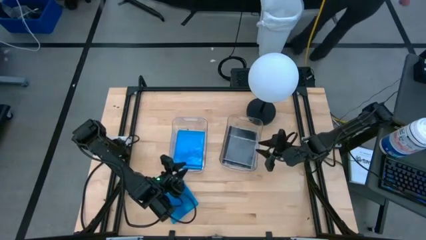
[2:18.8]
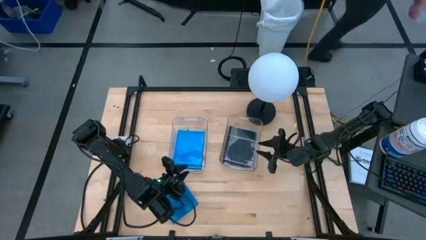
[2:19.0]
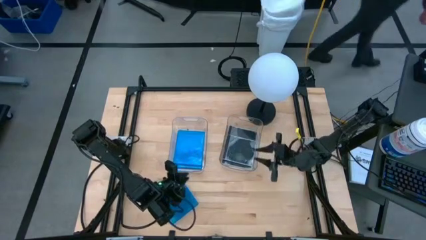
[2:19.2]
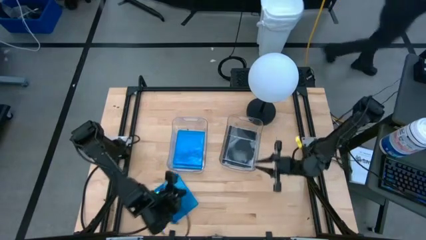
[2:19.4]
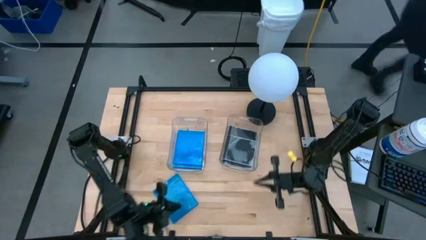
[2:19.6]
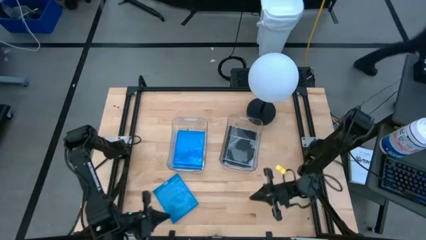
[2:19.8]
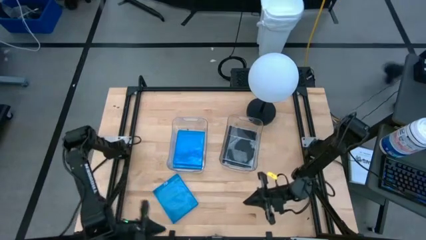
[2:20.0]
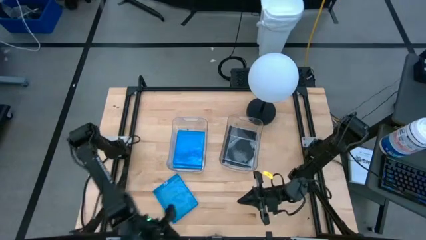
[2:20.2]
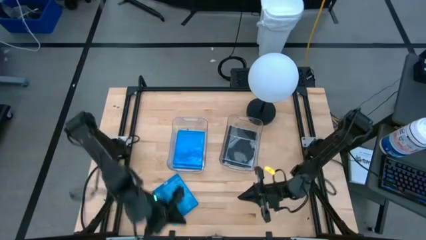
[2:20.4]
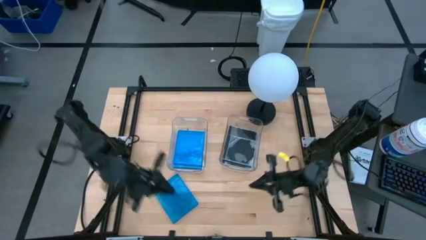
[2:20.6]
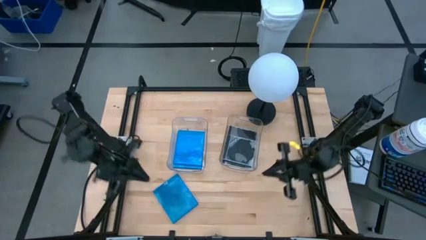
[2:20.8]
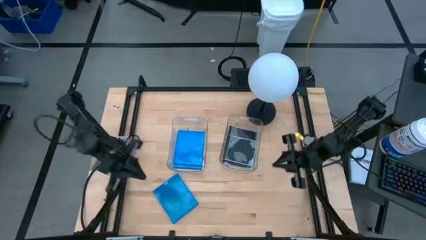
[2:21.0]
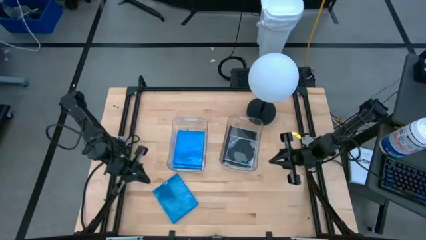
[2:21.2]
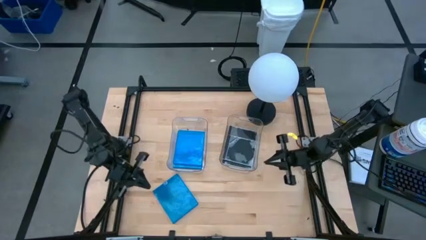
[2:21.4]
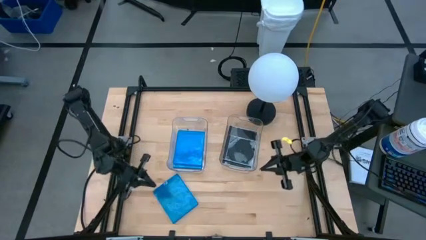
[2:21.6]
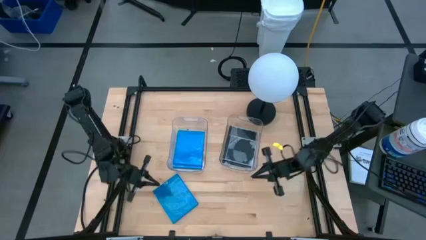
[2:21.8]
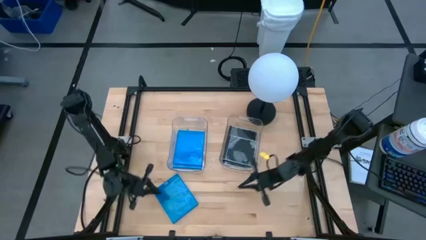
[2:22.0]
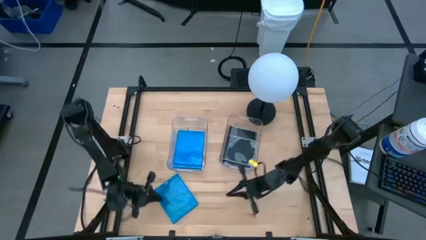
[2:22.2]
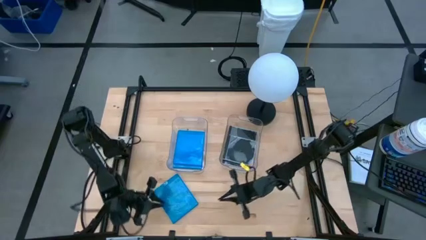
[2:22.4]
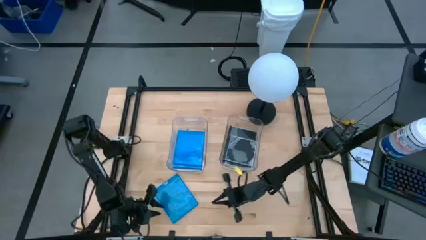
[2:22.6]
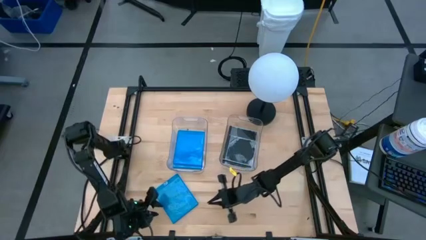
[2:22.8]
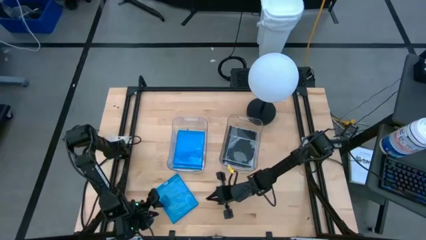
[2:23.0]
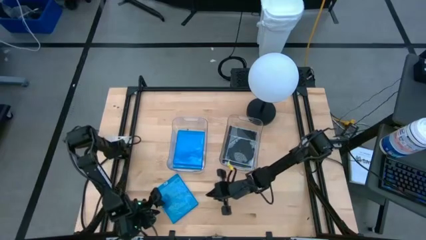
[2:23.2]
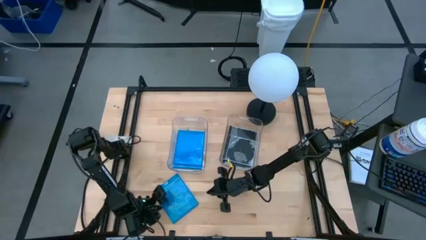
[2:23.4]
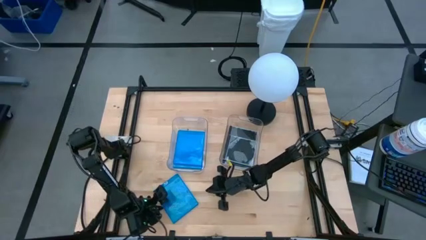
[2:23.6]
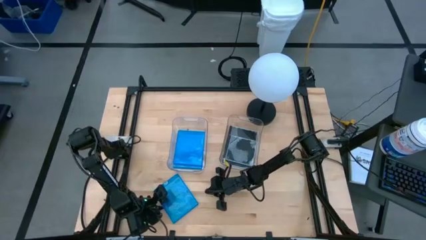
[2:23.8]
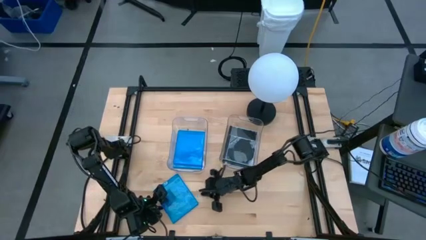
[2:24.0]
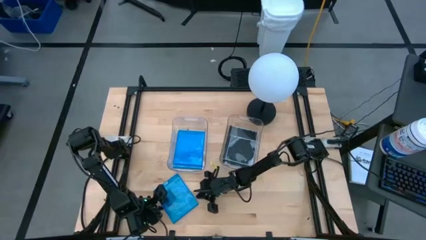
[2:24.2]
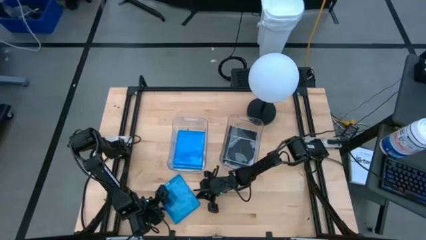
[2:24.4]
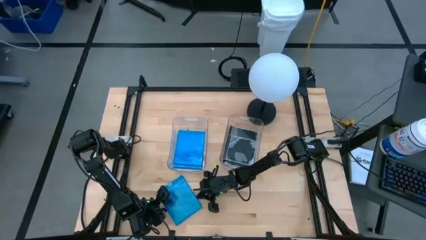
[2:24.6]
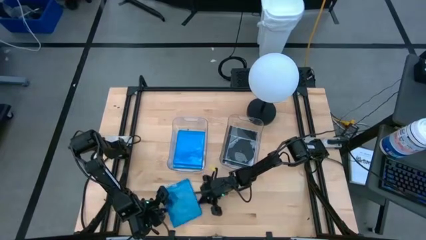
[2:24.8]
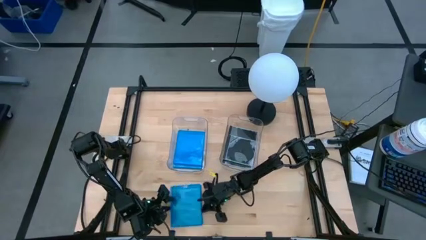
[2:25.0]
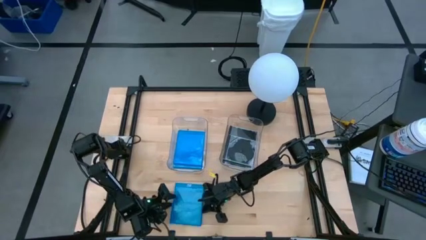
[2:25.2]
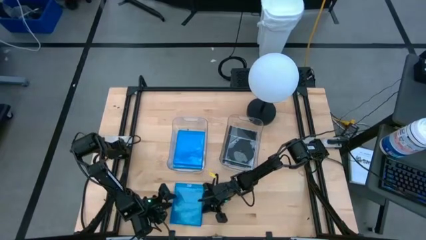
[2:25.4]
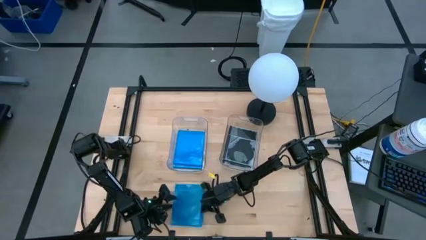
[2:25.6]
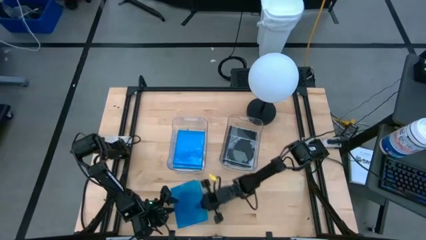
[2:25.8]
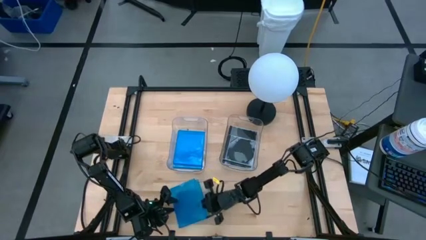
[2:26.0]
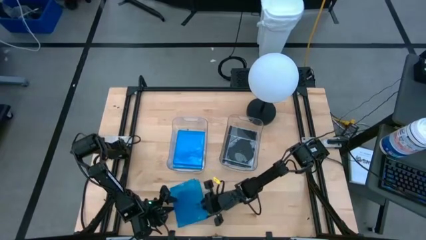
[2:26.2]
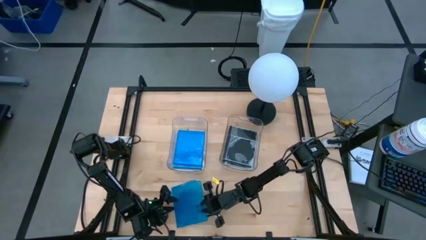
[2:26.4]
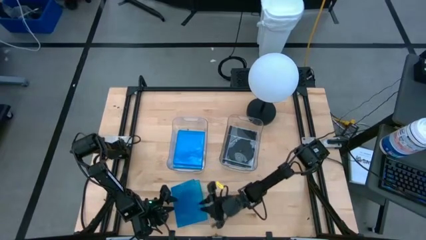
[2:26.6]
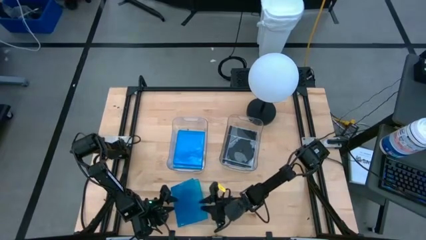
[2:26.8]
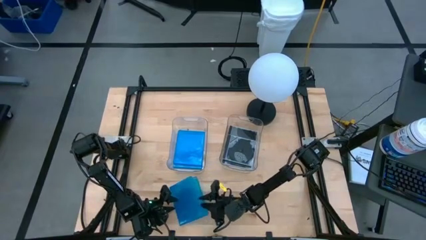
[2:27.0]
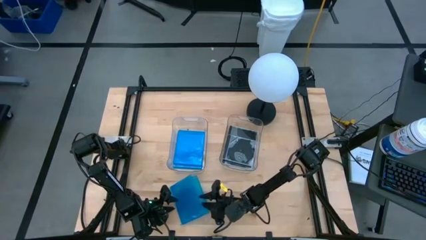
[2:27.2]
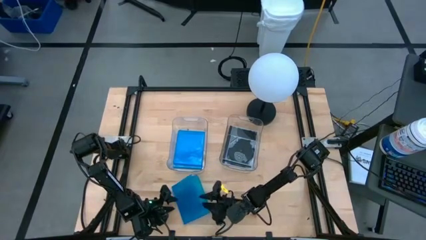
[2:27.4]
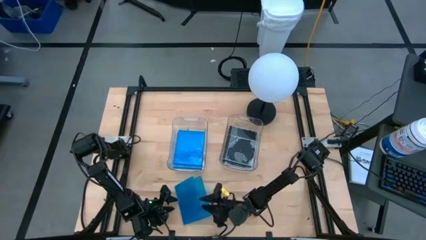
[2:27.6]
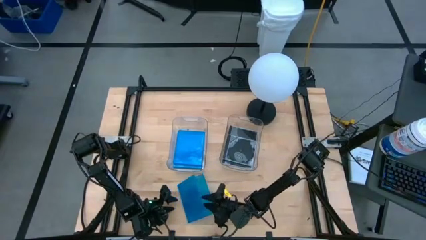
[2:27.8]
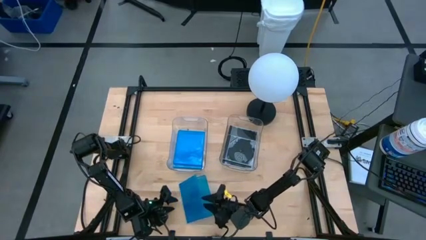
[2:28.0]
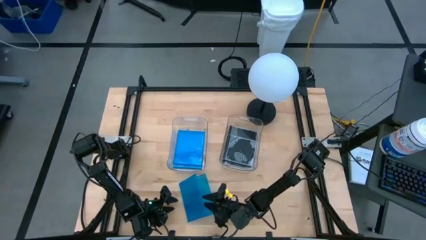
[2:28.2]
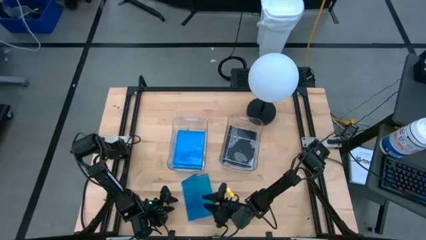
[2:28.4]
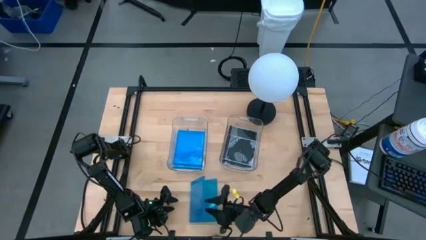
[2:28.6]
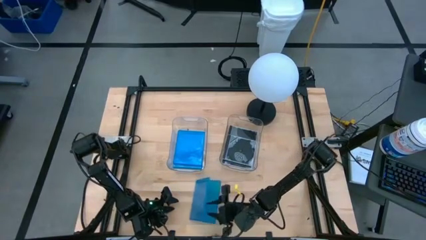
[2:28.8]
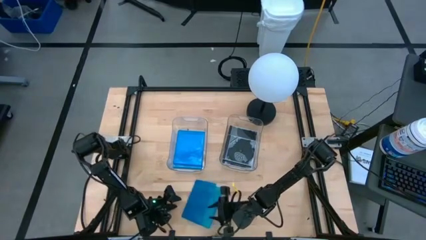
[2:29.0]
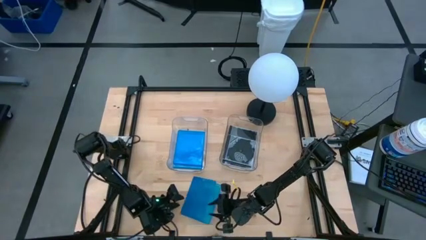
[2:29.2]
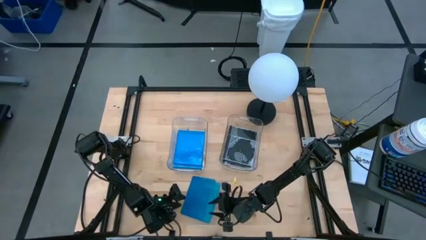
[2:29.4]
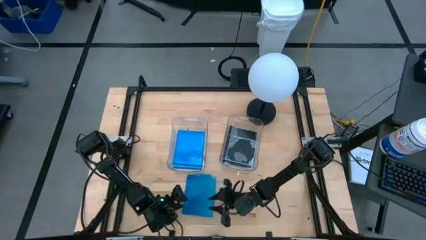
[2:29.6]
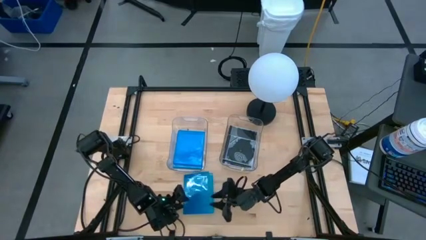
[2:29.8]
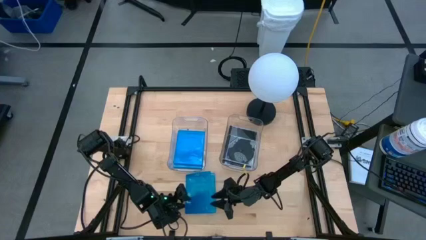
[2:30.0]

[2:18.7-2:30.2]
Task: Pick & place jewel cases by type
Put the blue CD case into the left transparent bin

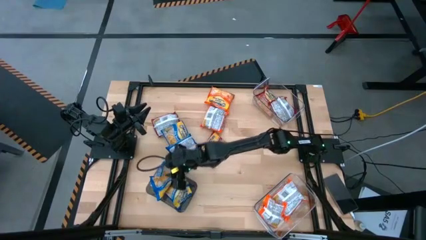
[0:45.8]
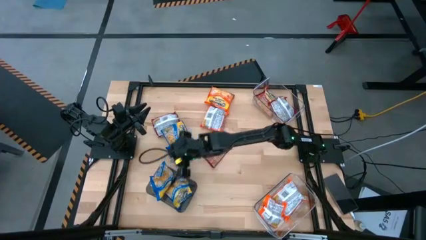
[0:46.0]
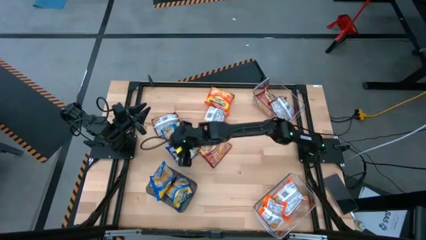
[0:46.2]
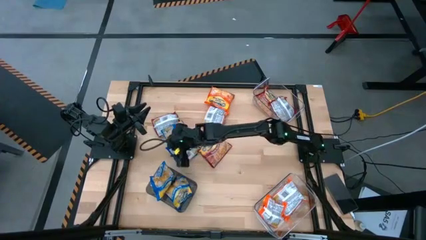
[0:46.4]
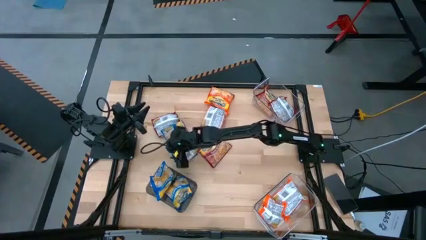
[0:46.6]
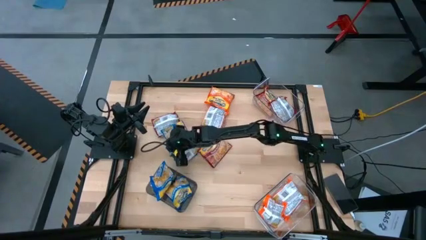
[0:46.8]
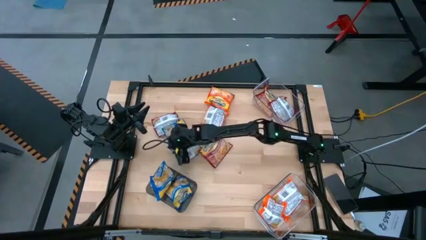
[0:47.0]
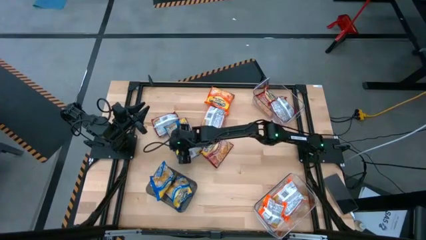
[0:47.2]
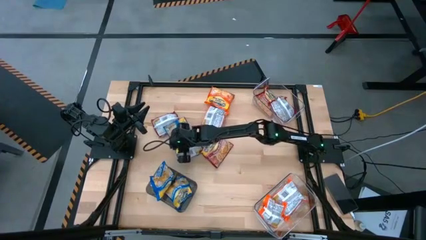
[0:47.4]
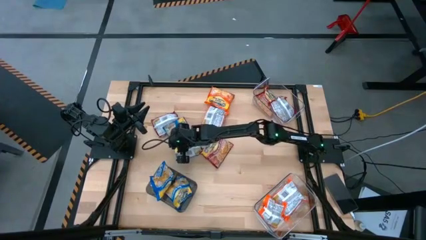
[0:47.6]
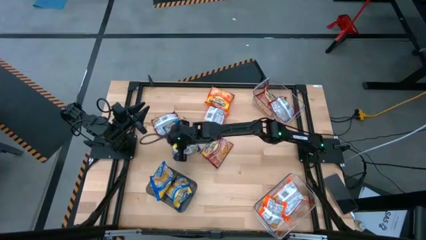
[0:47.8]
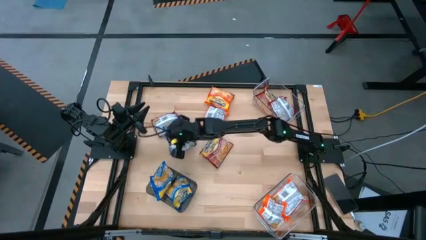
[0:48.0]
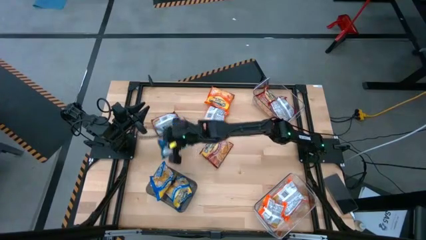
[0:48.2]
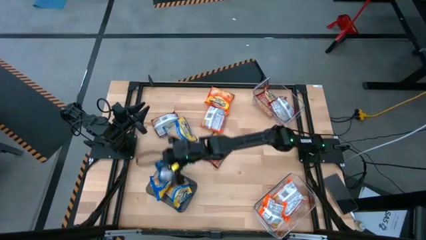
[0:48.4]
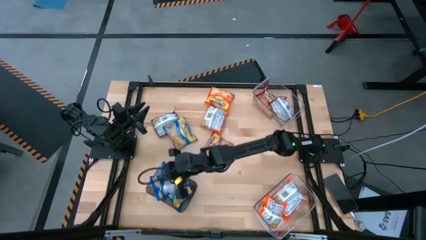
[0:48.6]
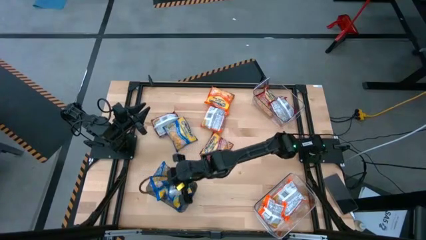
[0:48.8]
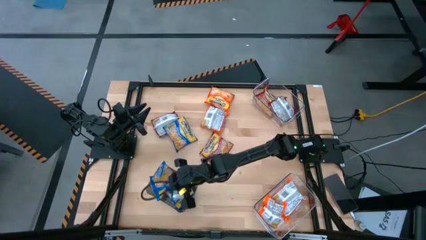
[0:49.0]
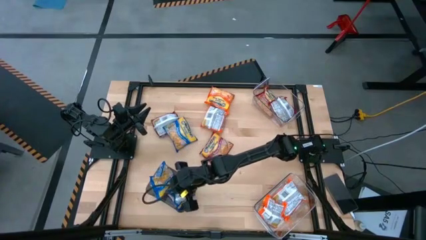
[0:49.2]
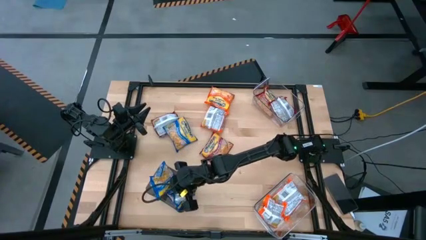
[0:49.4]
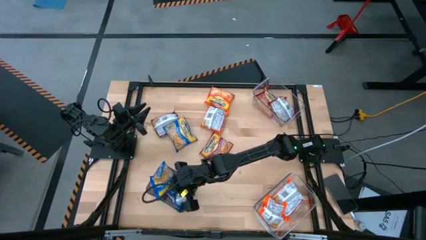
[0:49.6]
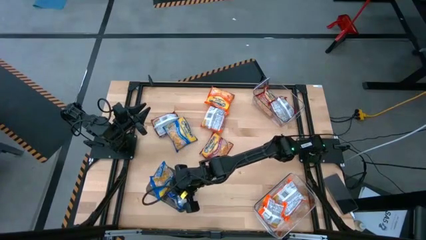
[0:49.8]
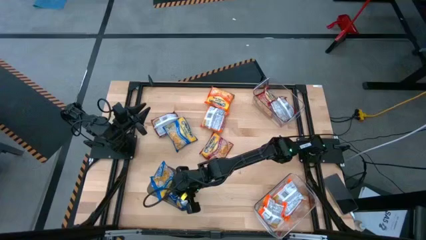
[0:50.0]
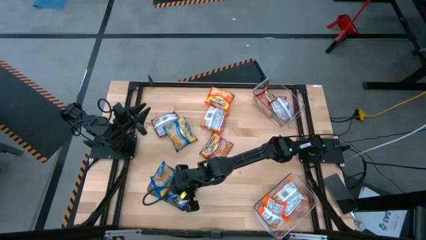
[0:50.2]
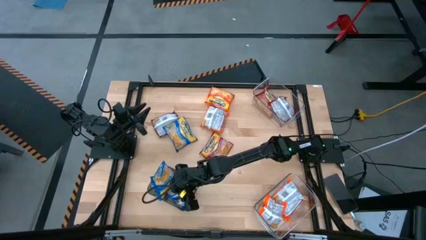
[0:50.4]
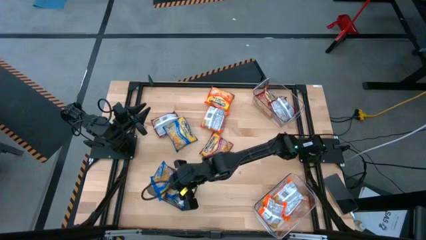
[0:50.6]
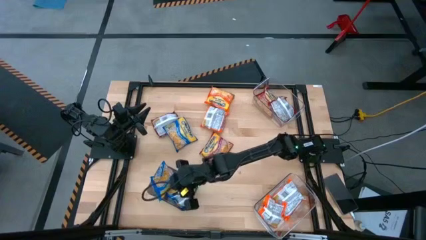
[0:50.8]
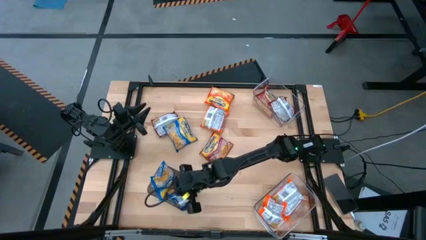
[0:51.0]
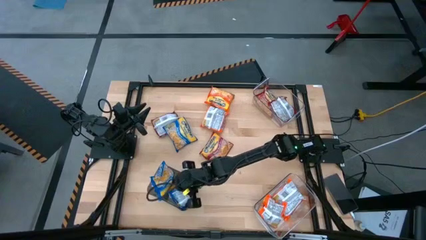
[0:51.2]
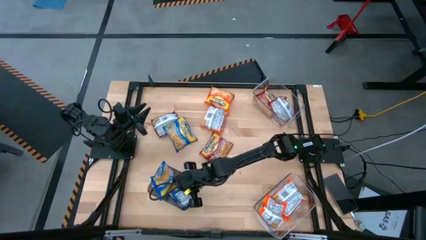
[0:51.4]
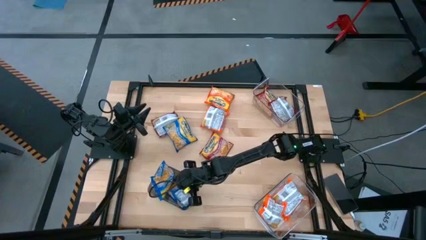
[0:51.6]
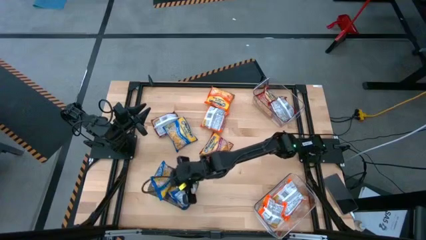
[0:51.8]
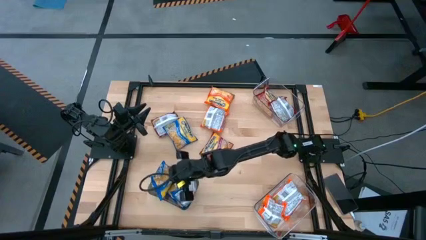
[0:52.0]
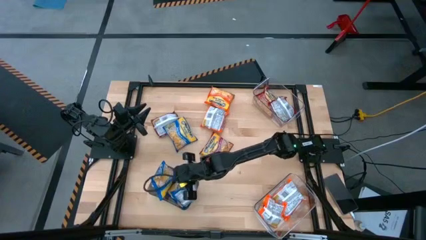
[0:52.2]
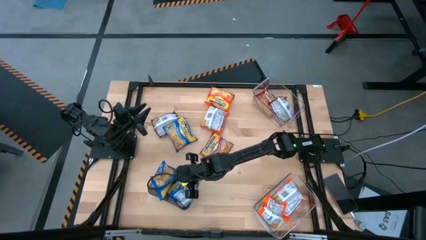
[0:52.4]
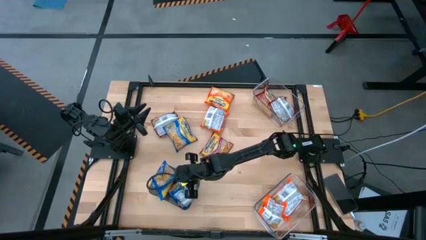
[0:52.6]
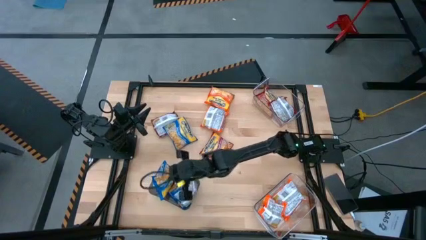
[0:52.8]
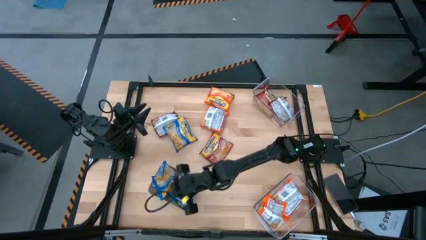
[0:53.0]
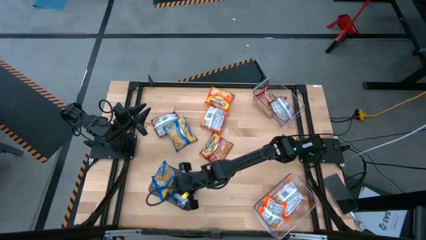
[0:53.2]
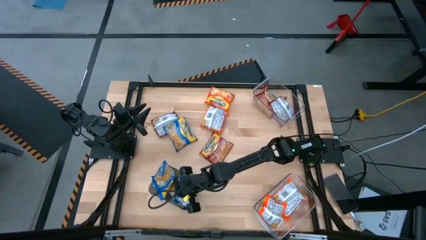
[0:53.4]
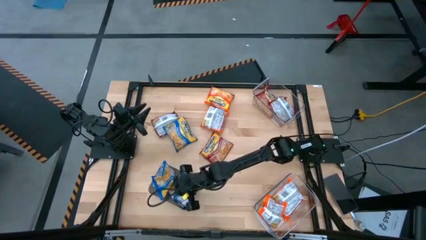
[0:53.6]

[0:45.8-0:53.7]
Task: Sort Maruchan noodles
Put the blue noodle pack into the black bin
